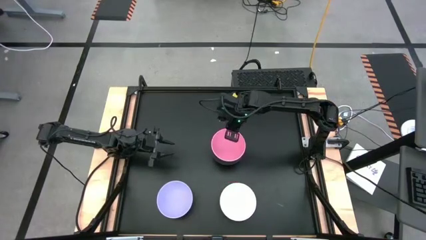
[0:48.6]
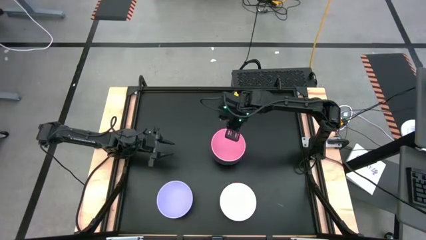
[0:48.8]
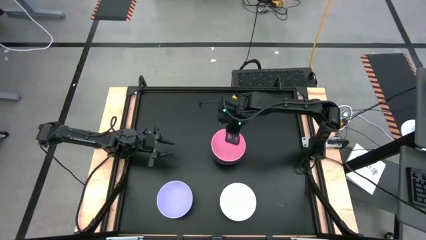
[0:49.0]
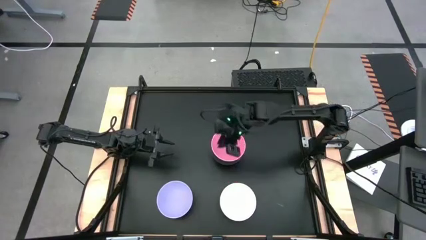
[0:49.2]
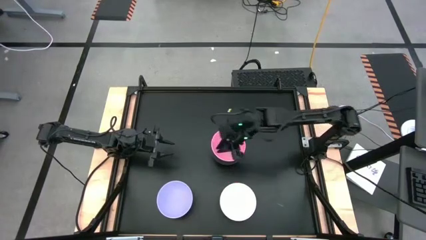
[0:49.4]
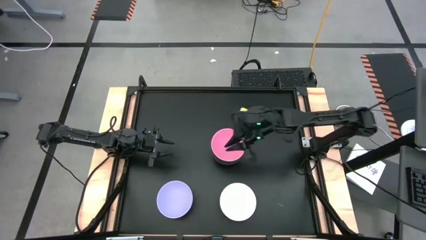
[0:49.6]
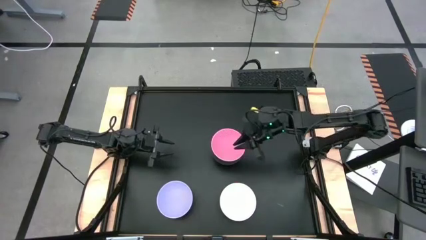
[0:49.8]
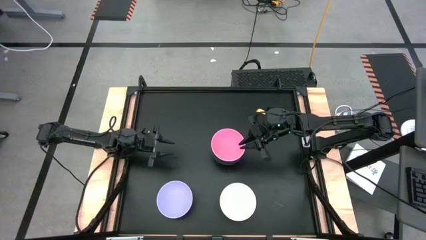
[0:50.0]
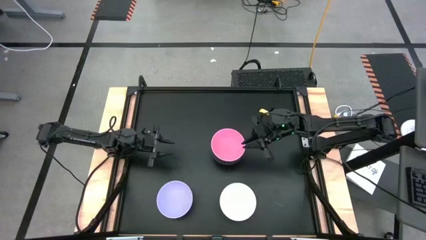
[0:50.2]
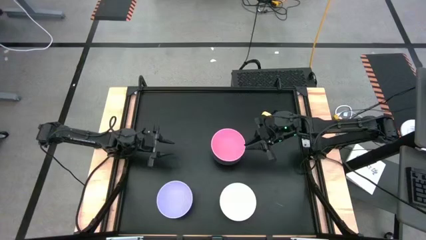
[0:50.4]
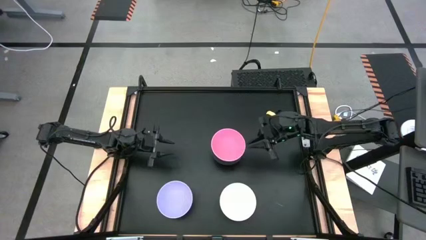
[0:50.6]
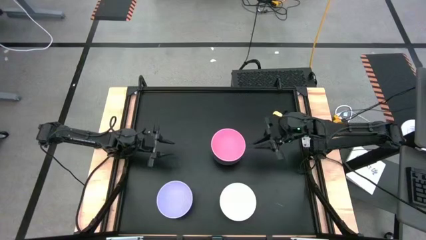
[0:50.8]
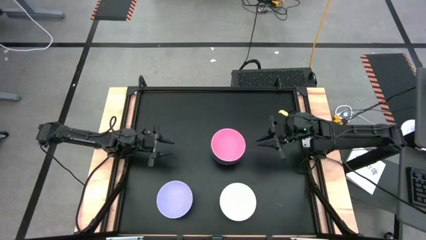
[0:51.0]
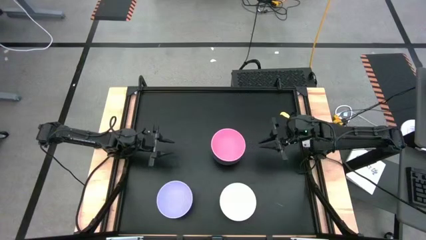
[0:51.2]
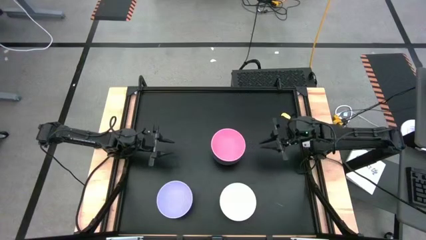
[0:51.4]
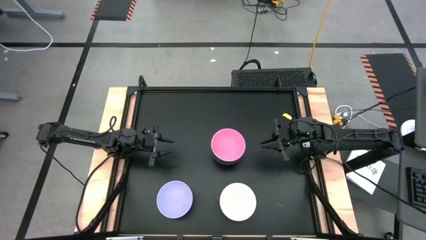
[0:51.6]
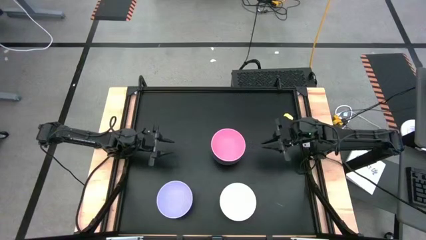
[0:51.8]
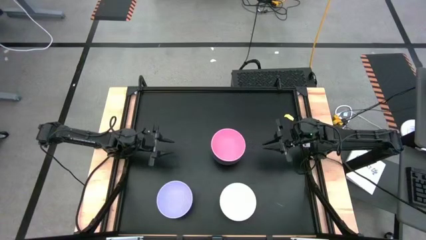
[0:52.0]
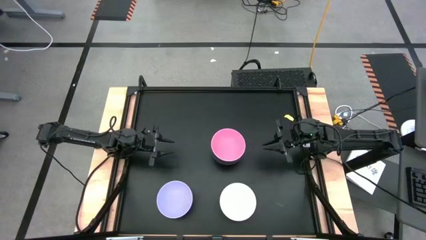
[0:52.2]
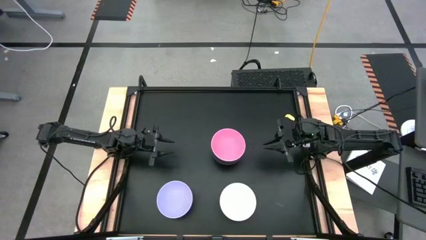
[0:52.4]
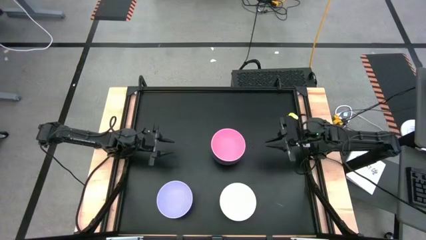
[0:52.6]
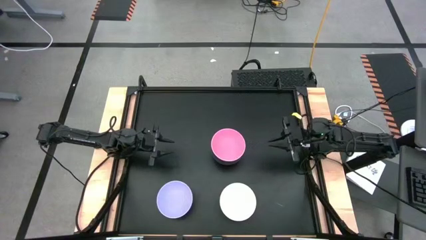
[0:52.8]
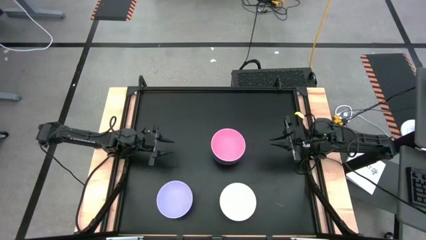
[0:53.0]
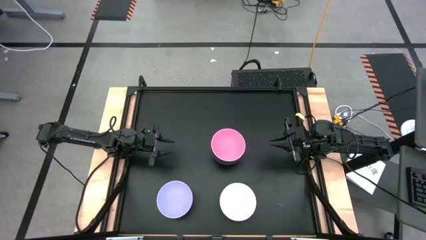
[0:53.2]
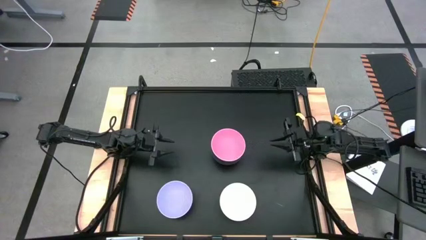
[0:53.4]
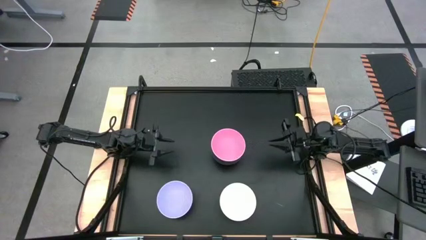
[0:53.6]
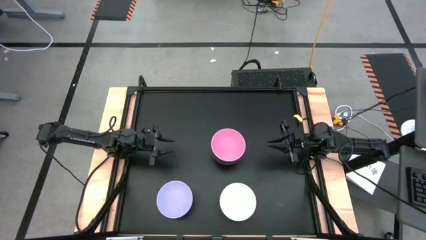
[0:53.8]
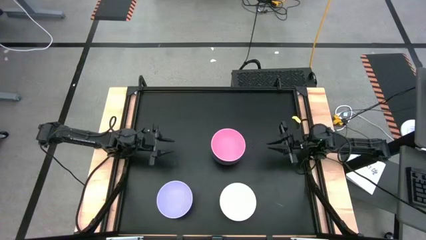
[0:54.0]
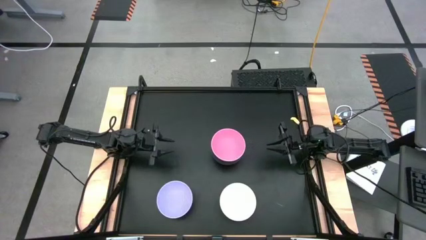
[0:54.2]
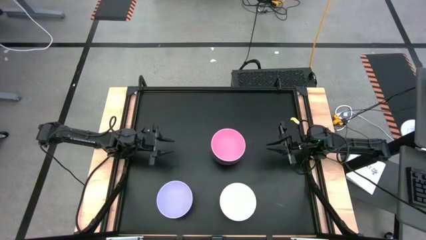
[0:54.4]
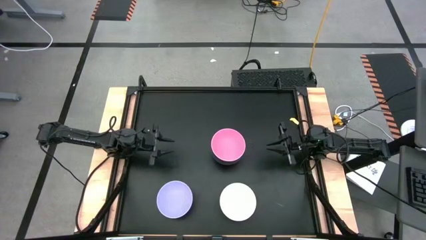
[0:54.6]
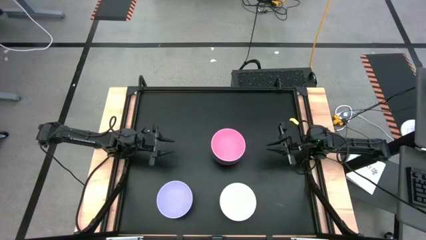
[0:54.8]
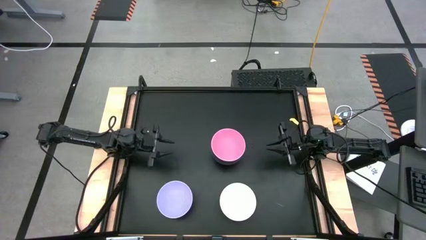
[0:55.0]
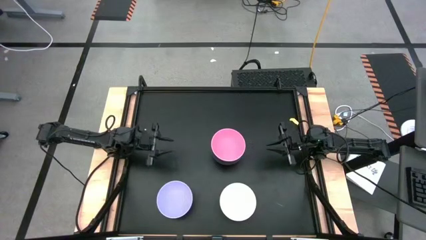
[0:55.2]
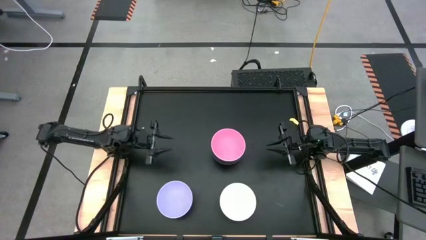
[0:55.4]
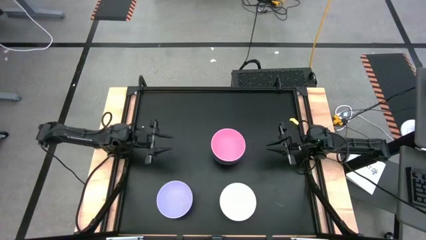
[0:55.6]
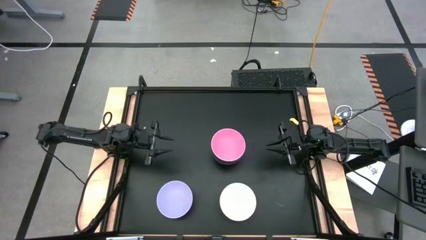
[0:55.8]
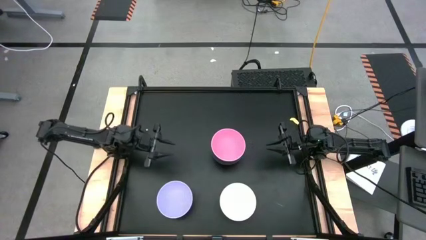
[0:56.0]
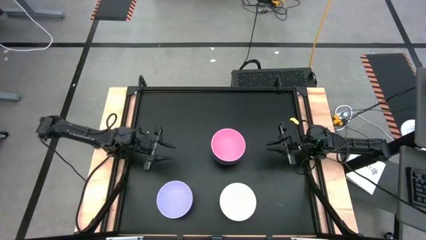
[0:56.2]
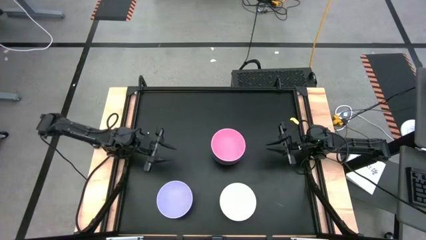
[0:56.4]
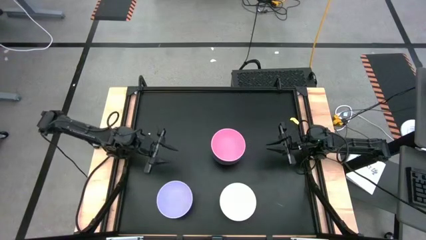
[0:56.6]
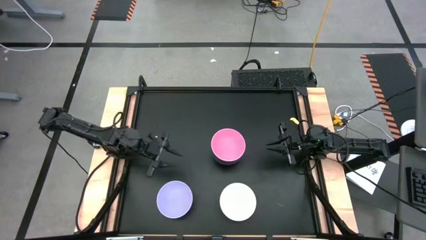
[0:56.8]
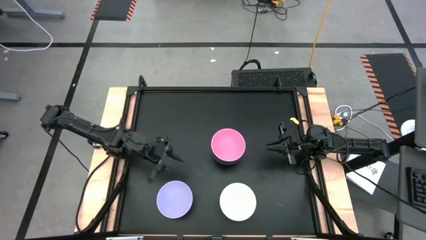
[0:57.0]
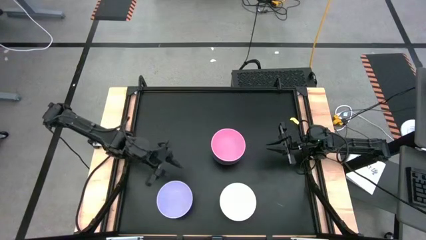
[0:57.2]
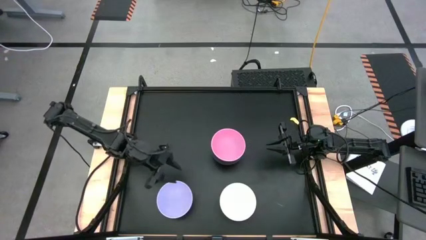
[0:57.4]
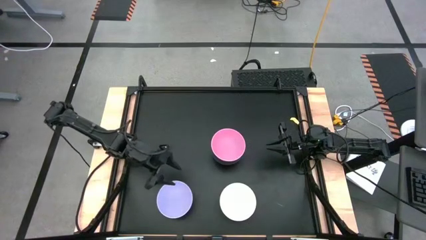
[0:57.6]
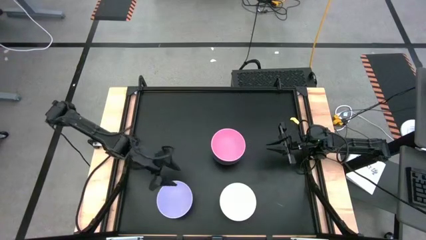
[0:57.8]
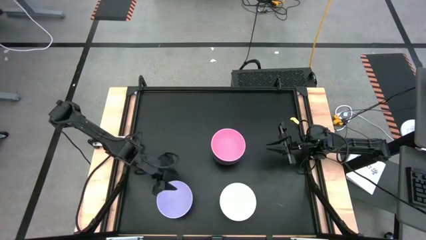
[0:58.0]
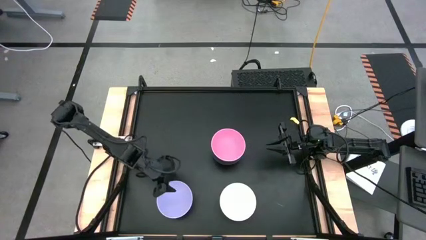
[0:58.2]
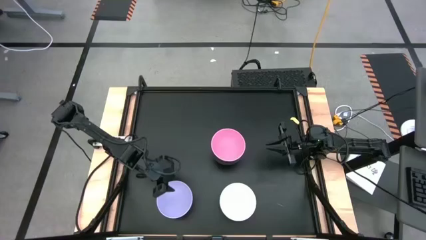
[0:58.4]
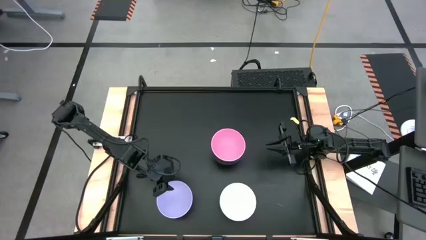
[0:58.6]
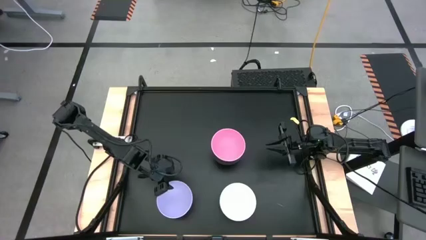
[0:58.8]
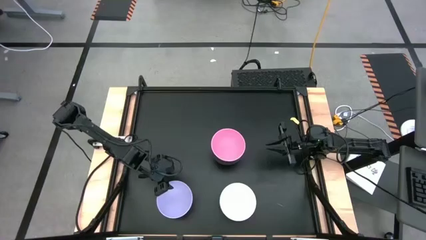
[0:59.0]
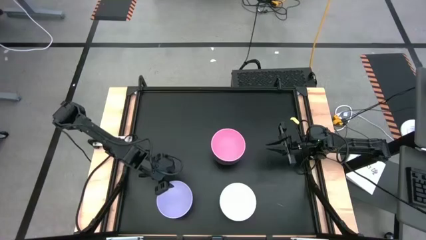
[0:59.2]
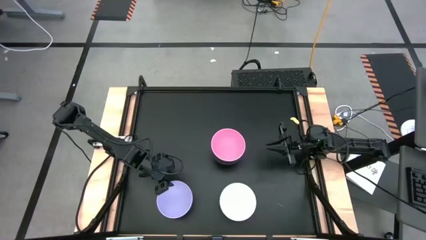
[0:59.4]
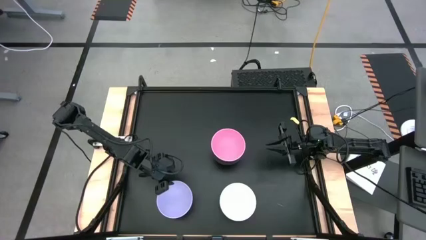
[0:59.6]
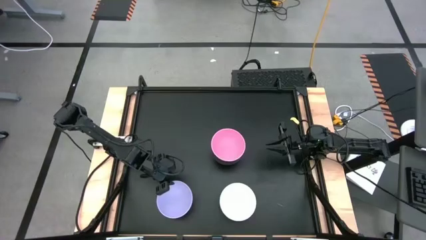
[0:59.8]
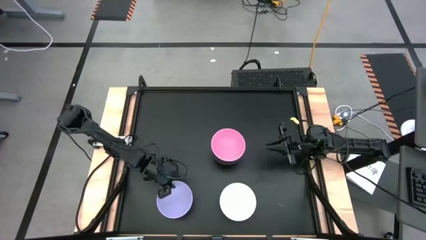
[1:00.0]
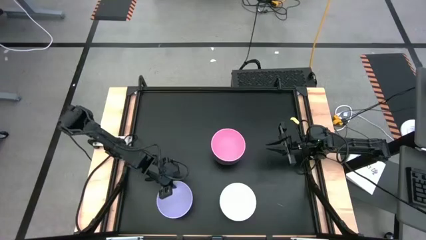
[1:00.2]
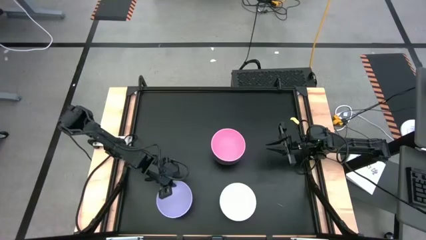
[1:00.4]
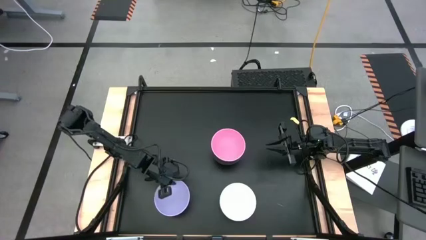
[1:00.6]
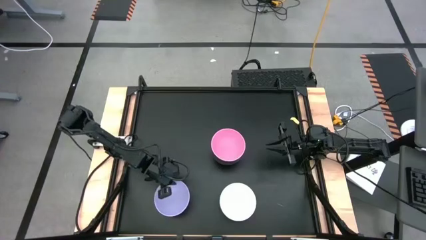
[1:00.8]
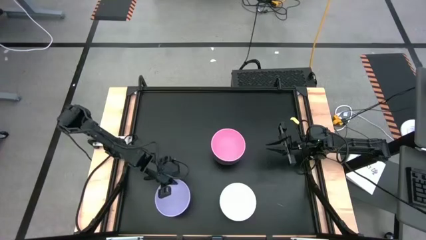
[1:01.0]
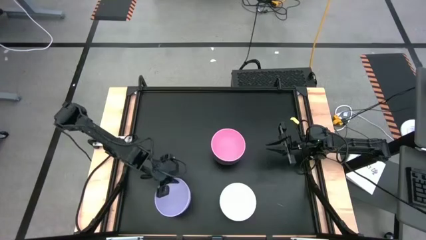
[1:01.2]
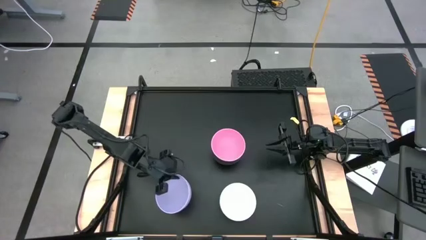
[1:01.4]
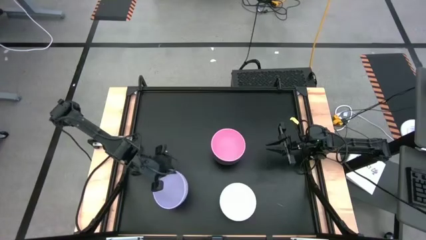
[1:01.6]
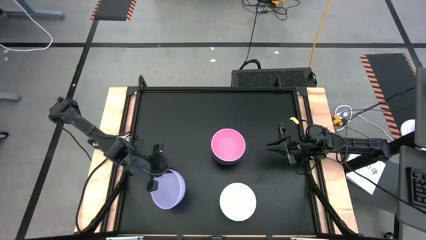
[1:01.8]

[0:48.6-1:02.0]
Task: Nest bowls inside each other
Stack the purple bowl on top of the pink bowl

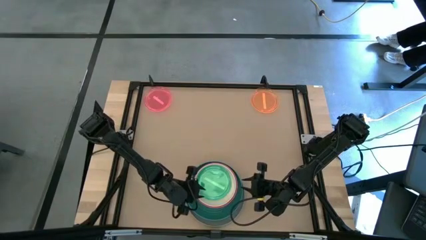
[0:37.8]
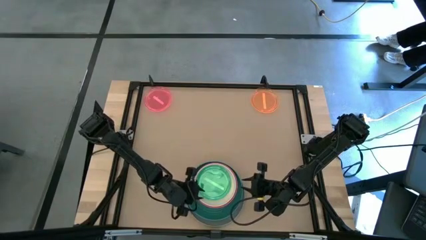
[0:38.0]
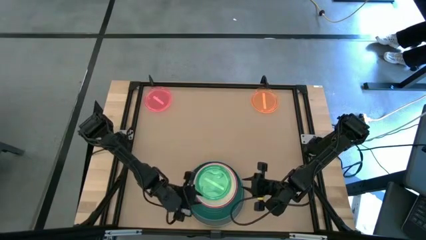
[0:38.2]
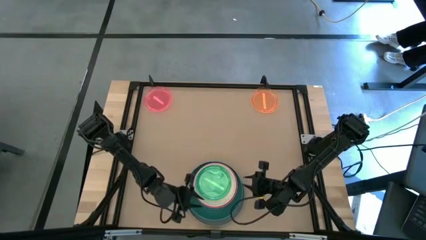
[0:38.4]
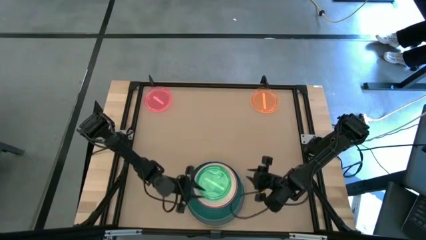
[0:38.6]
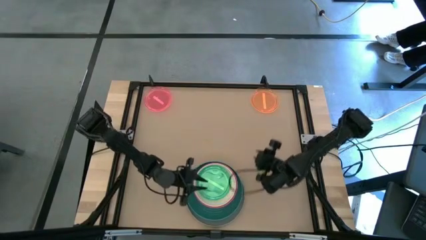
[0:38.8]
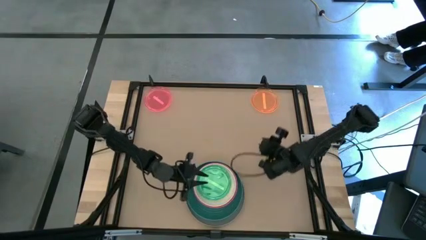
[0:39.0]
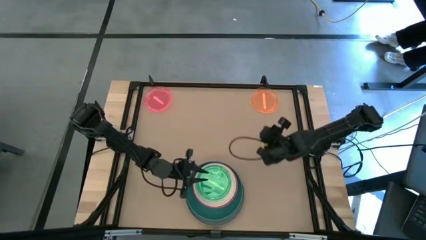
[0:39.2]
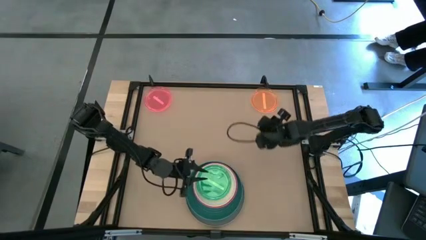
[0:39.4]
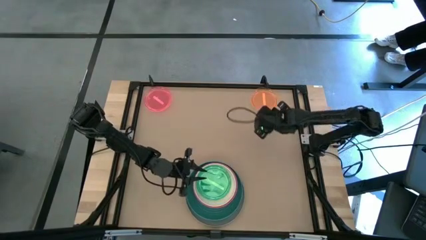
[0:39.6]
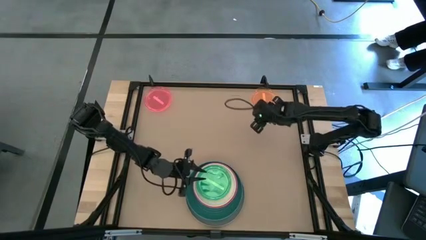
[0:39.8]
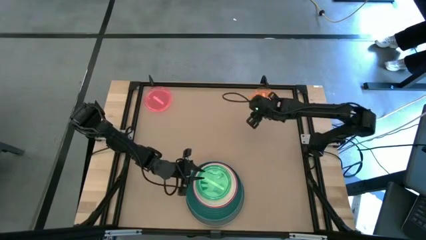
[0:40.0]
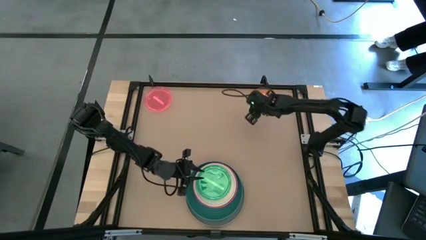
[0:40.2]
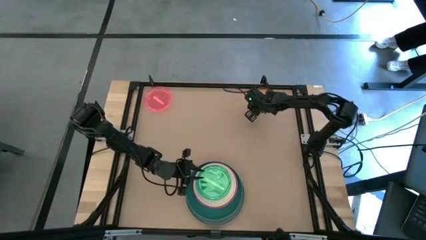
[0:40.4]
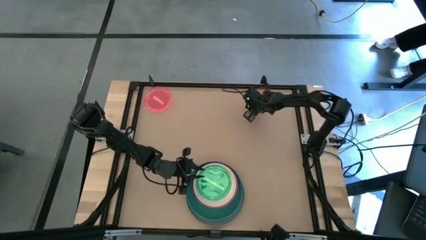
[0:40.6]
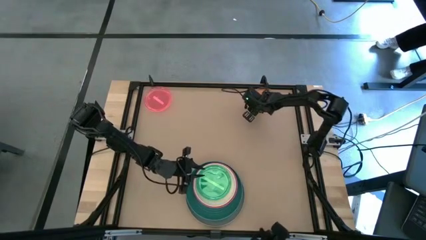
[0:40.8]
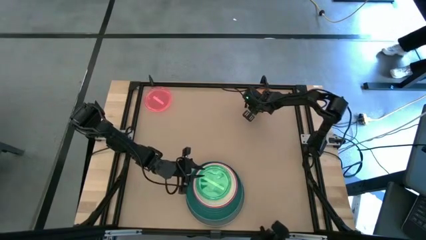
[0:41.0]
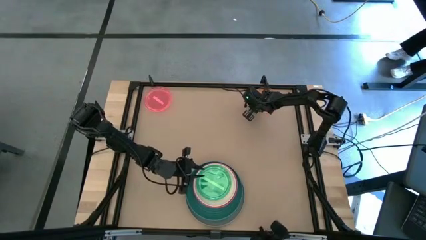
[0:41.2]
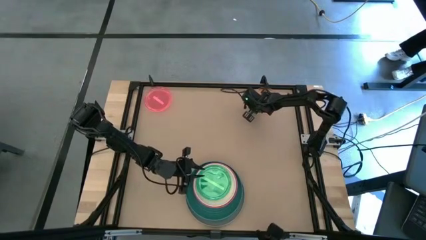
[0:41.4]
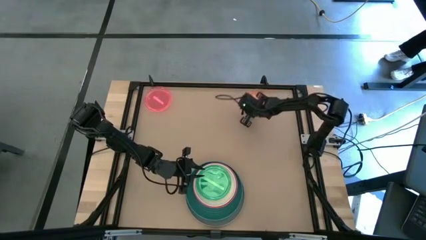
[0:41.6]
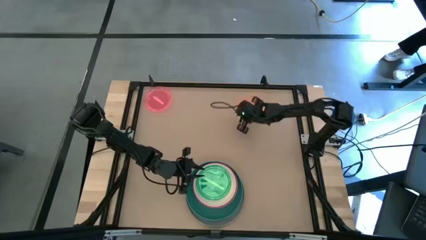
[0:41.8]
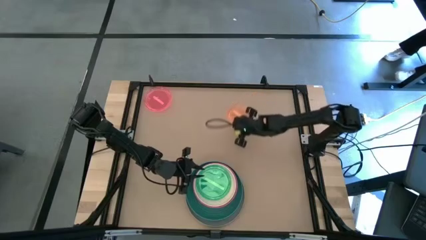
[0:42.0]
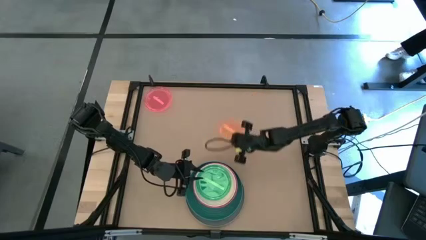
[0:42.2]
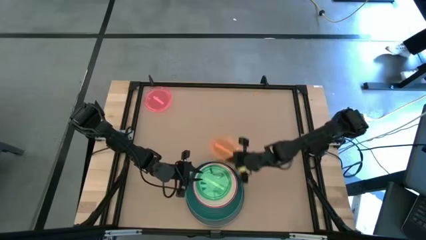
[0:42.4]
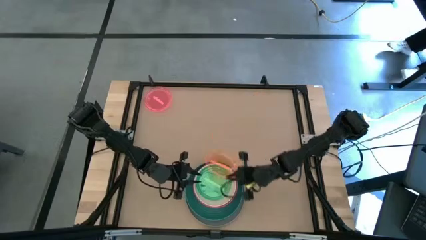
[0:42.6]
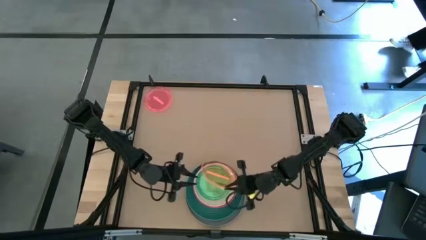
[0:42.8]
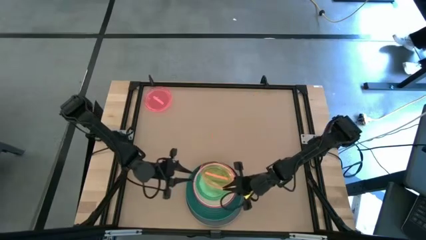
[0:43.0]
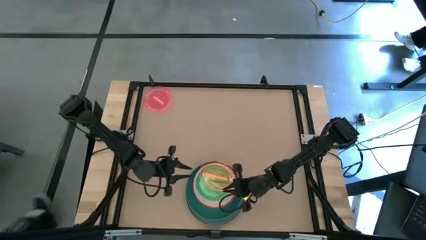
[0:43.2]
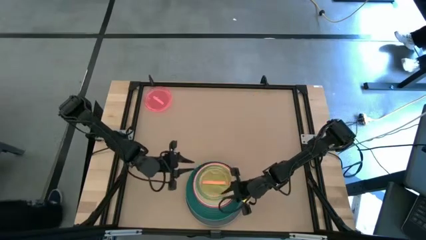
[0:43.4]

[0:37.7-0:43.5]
Task: Stack plastic plates
Stack the transparent orange plate on top of the transparent green plate
